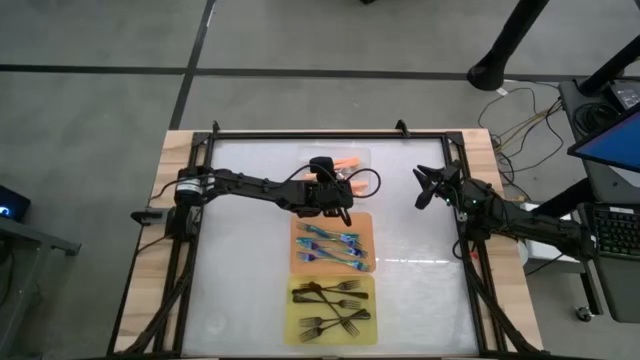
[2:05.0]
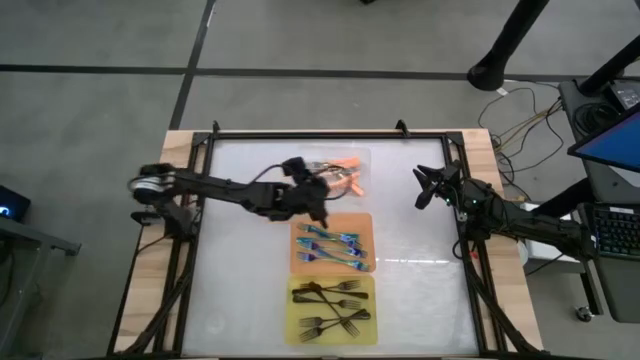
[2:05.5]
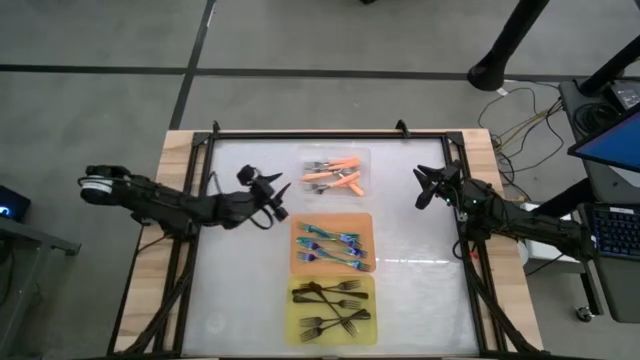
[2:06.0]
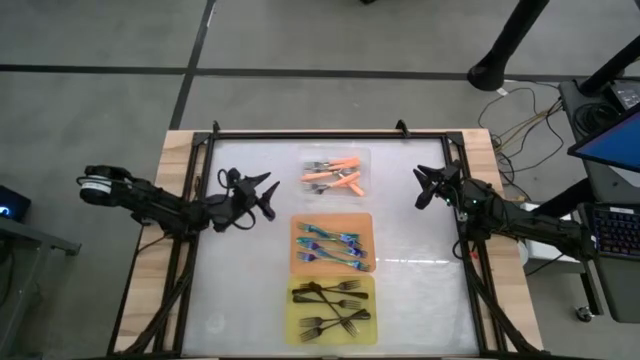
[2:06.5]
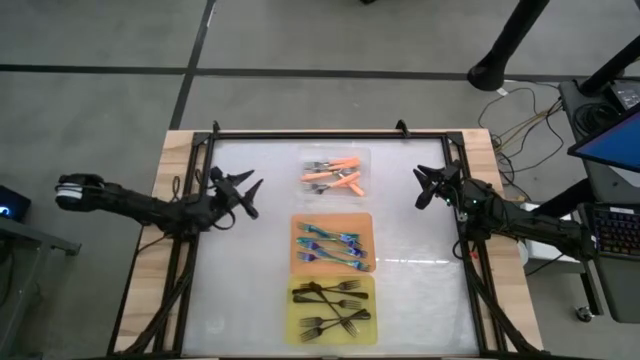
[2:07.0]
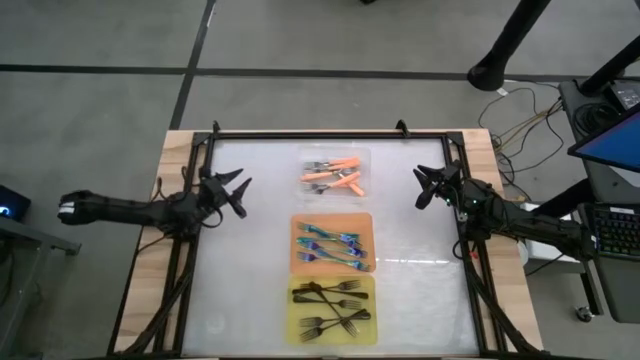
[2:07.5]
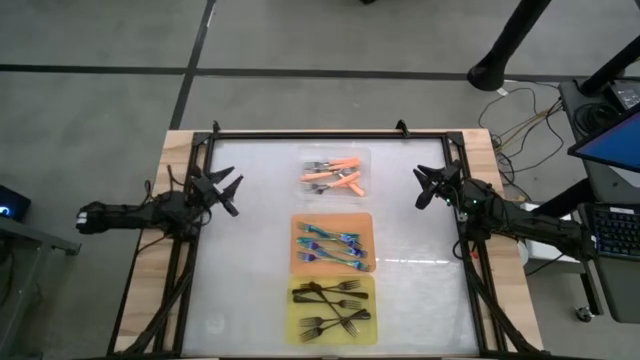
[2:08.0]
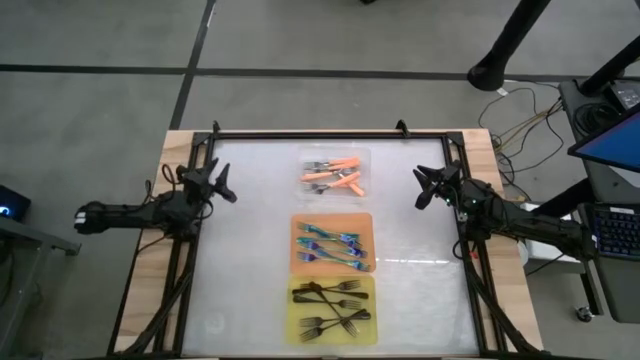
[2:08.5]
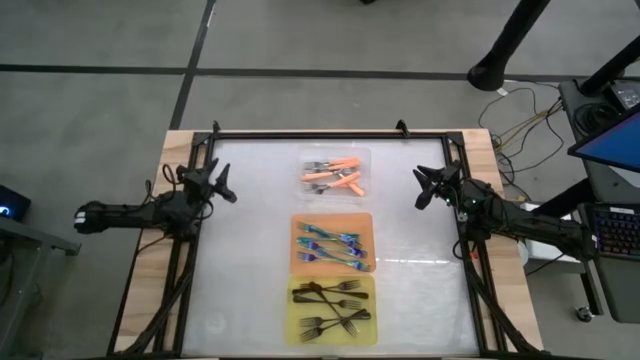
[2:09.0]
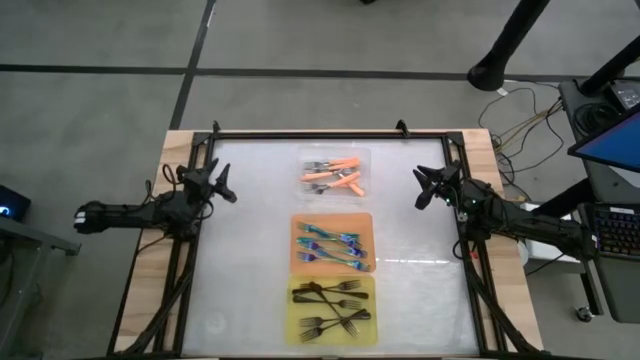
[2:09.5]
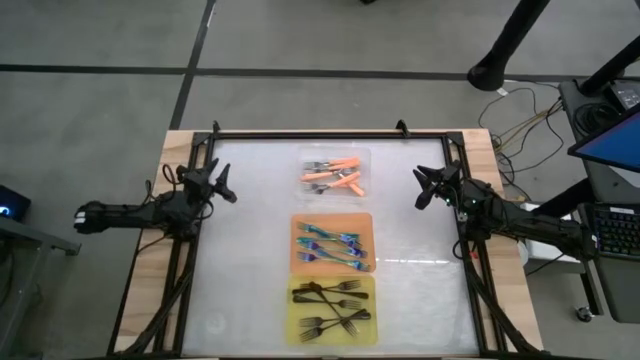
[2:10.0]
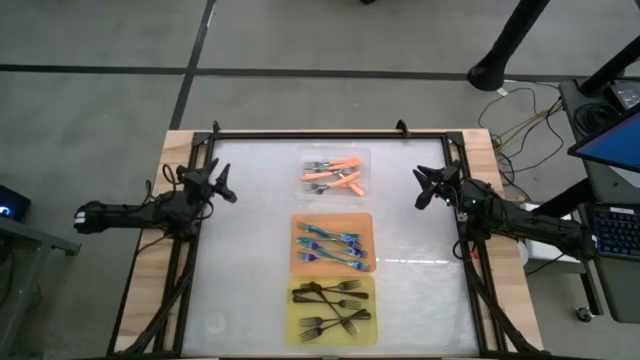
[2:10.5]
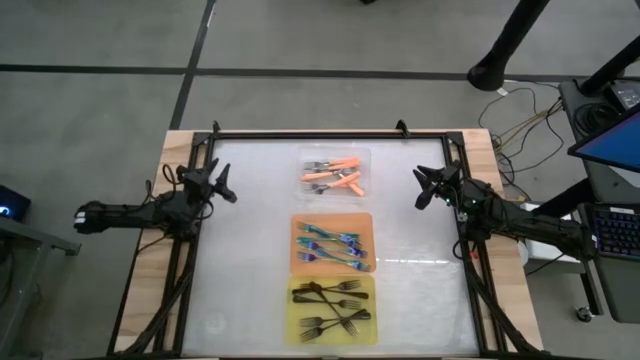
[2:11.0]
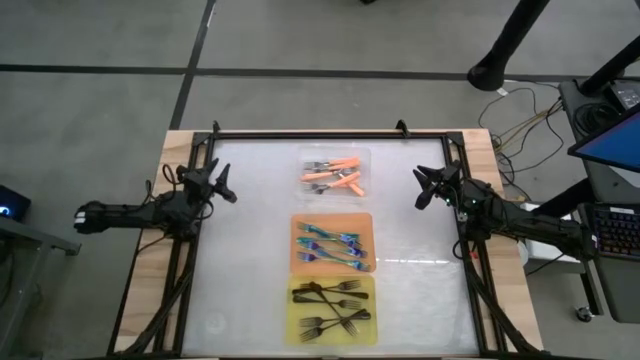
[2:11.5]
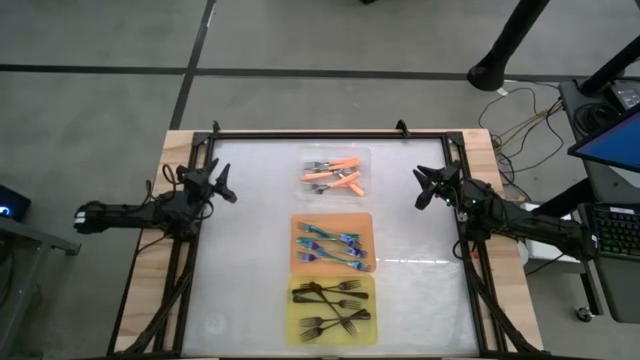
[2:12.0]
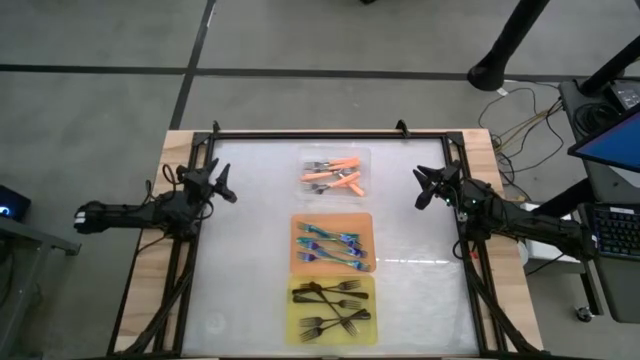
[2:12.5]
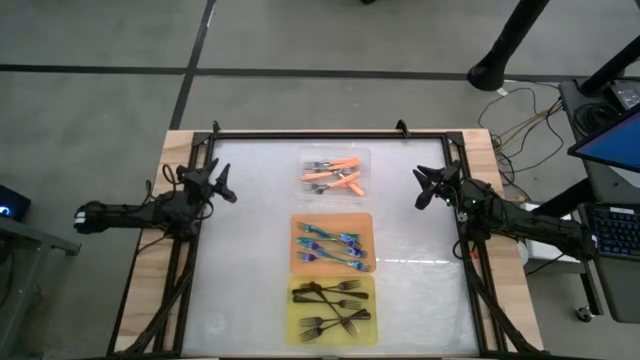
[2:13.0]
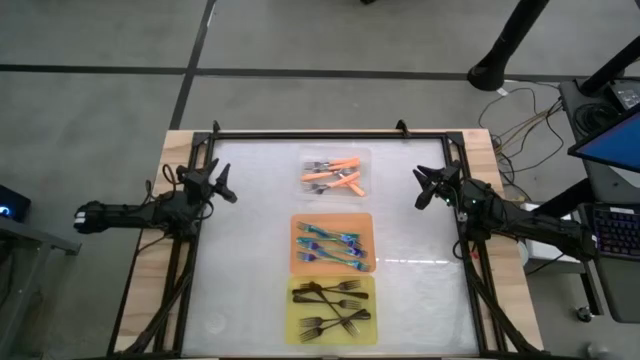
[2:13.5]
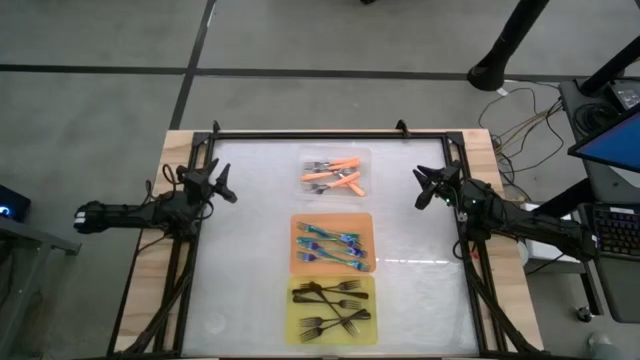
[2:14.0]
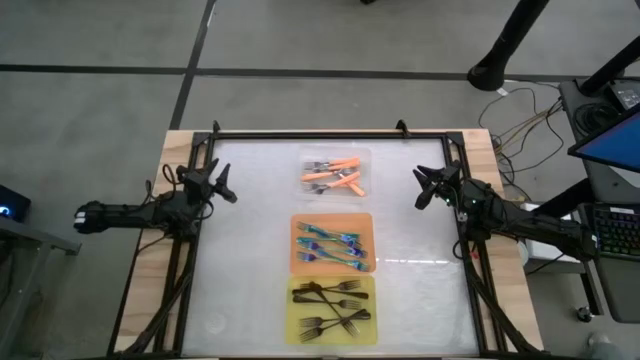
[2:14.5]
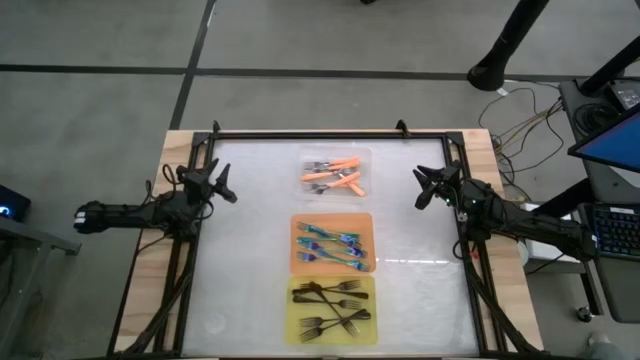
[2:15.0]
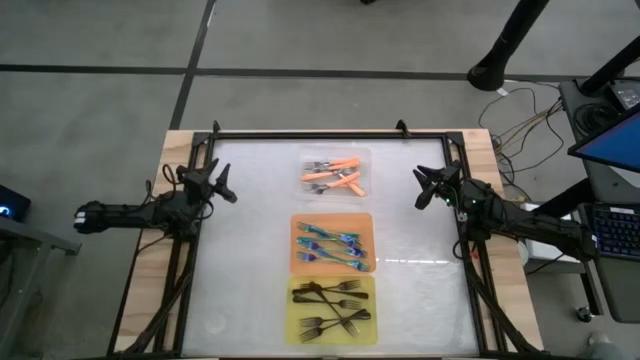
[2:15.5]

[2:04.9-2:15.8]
Task: Sort silverware by color (type)
Return to Home Position

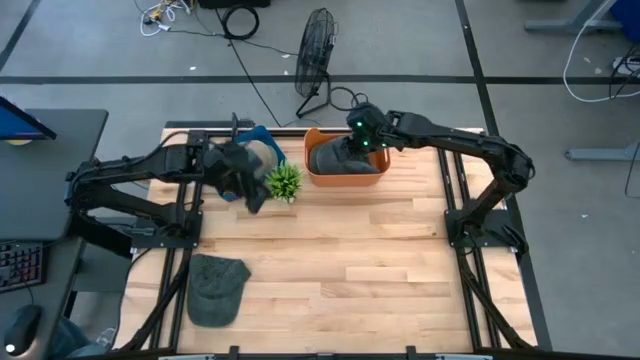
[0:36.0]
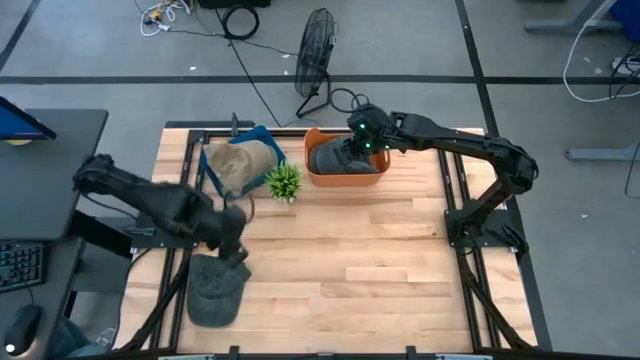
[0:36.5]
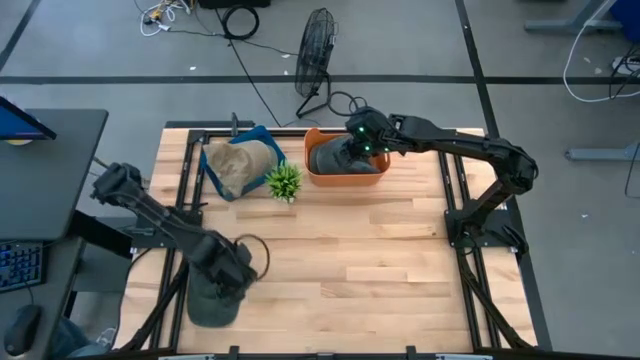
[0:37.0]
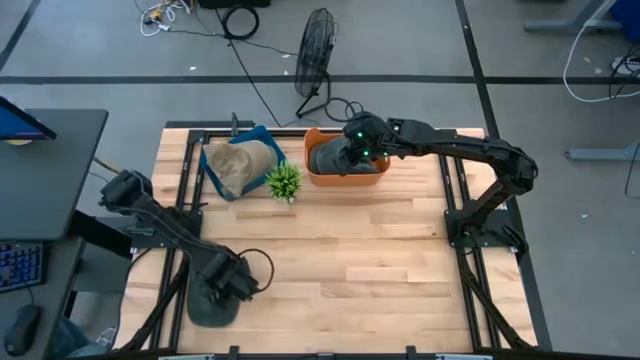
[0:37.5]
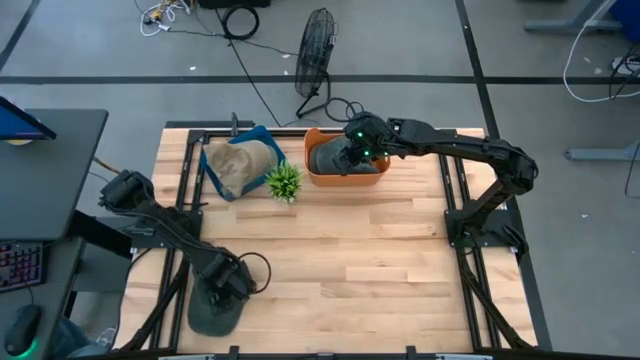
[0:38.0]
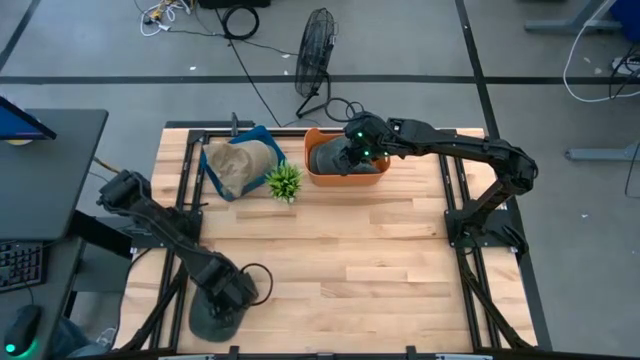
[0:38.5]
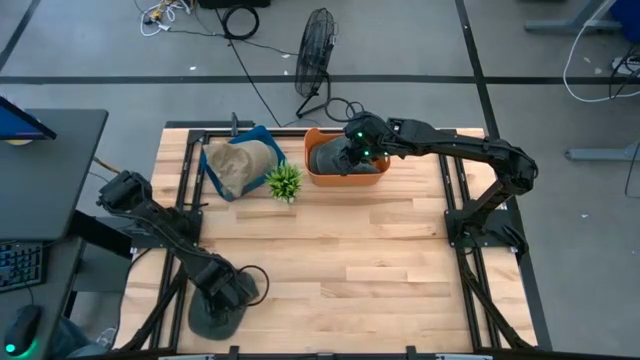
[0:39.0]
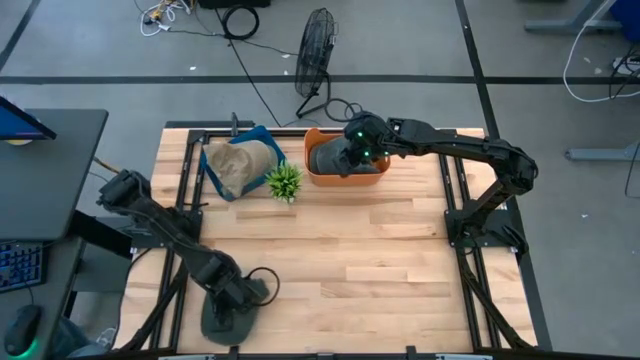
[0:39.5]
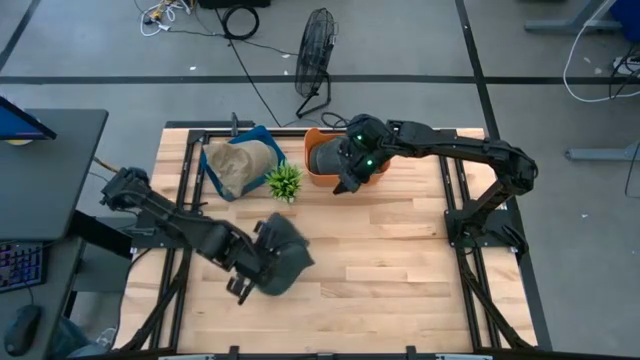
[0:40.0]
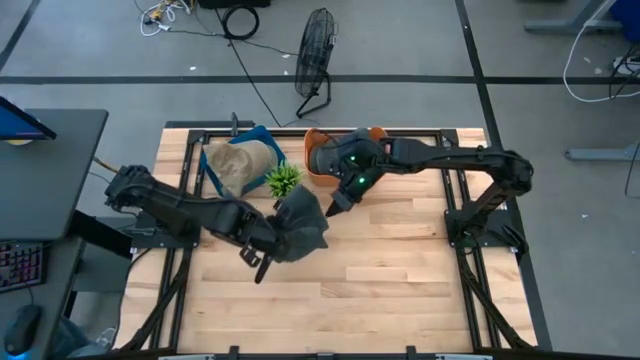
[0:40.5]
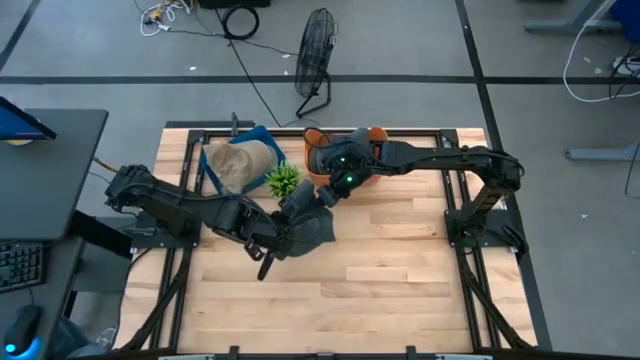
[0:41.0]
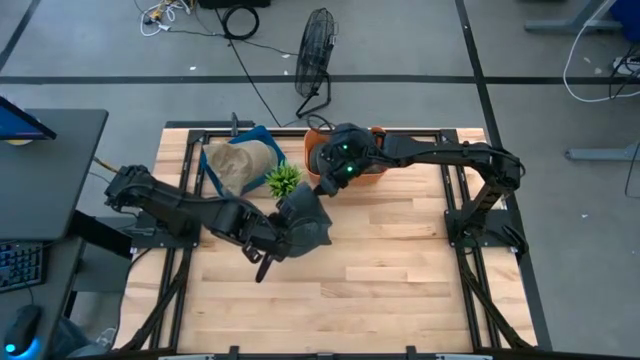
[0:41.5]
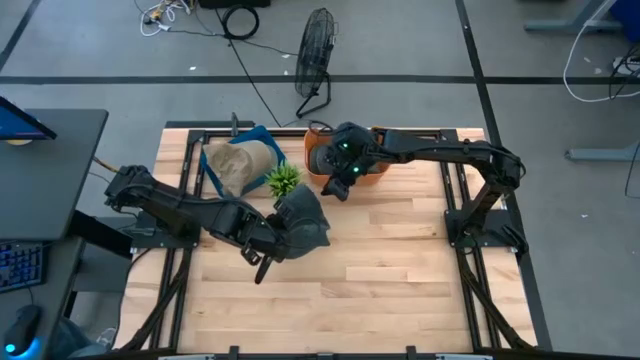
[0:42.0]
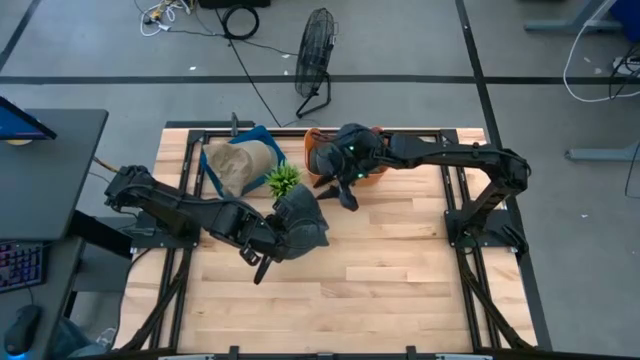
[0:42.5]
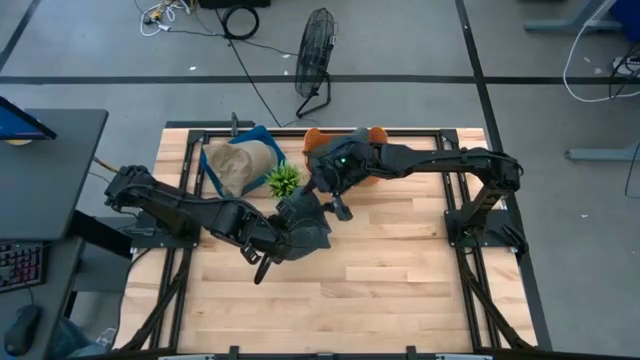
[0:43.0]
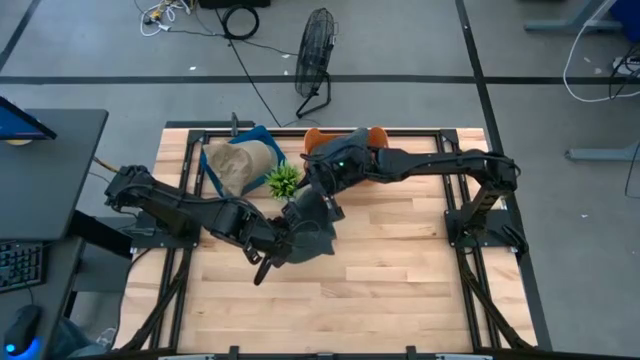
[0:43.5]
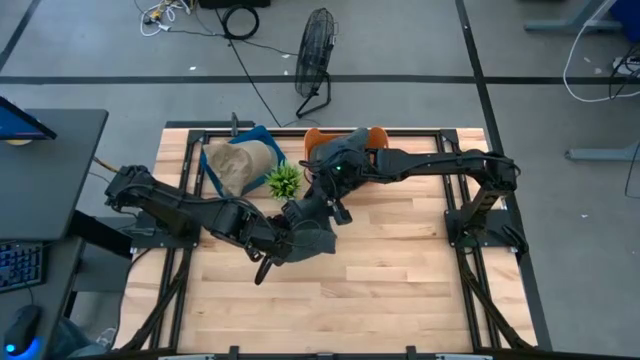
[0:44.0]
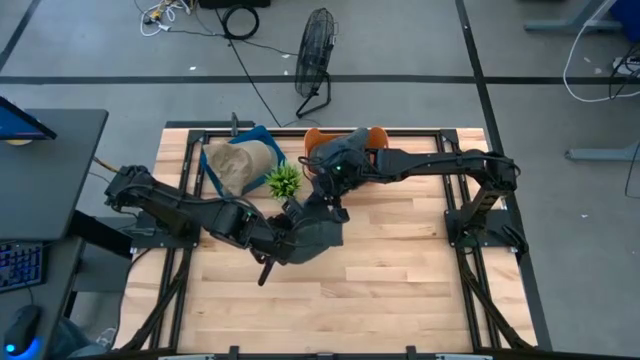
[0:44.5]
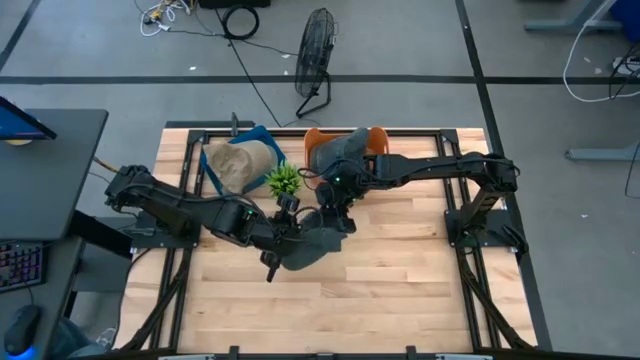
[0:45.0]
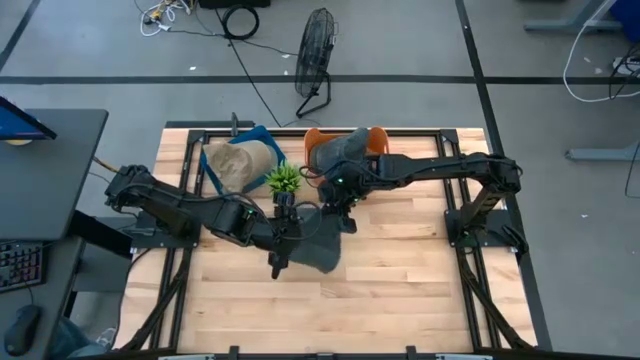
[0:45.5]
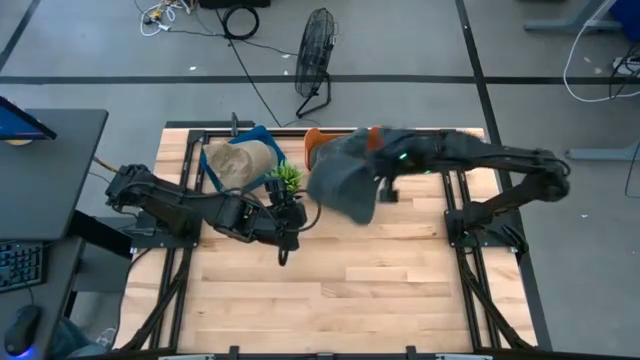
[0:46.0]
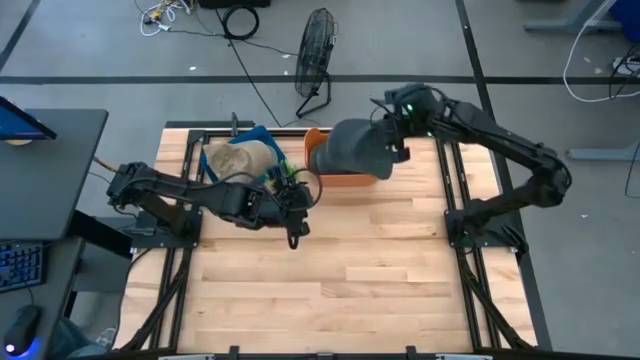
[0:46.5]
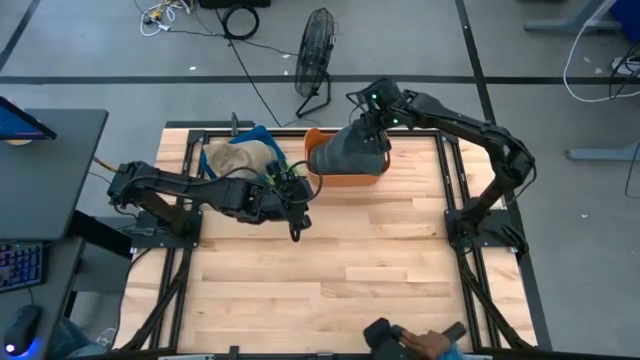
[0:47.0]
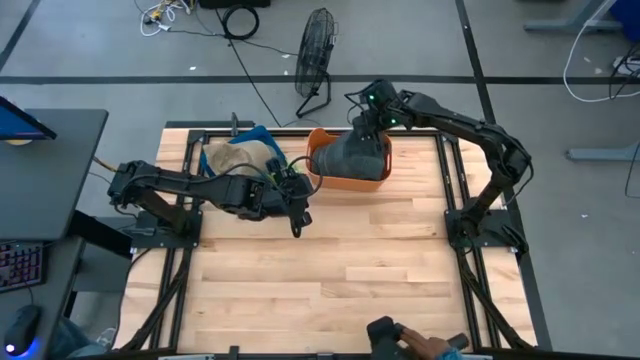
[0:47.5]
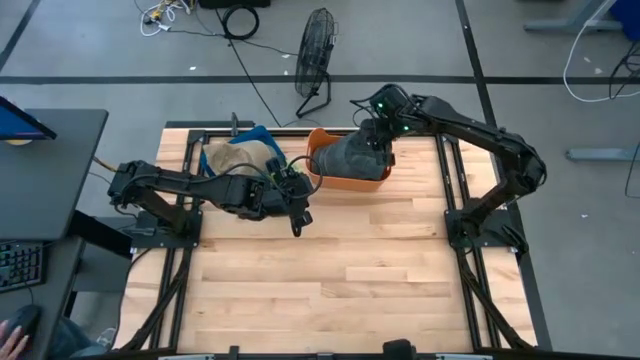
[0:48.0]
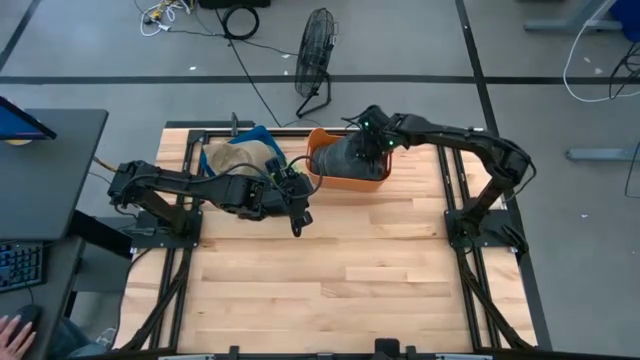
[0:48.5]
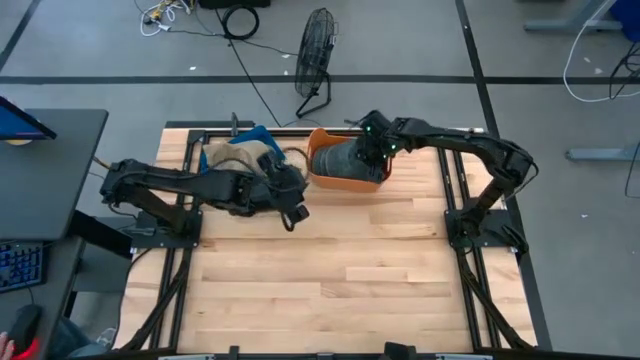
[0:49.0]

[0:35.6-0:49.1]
Task: Pick & Place hat
Put the black cap into the orange bin
